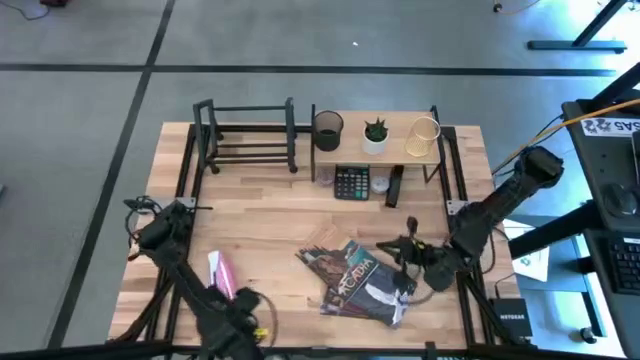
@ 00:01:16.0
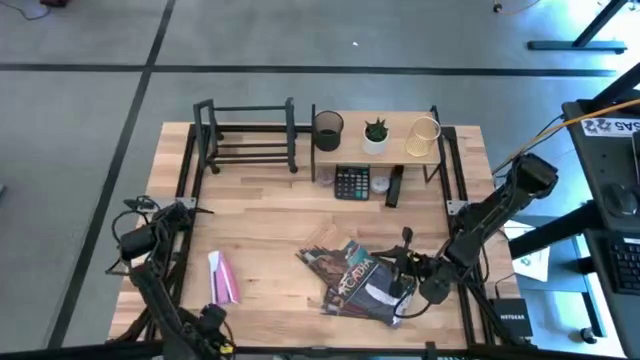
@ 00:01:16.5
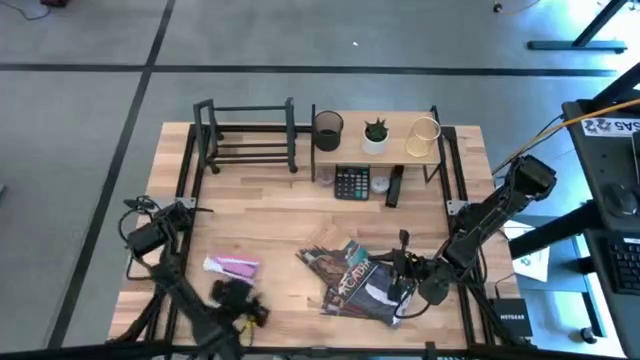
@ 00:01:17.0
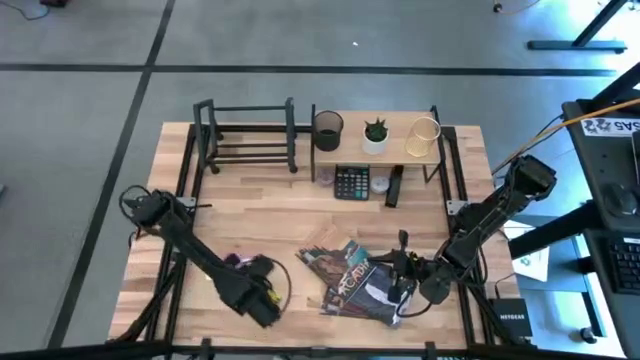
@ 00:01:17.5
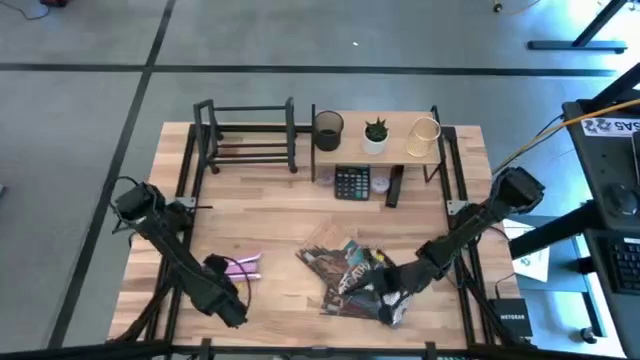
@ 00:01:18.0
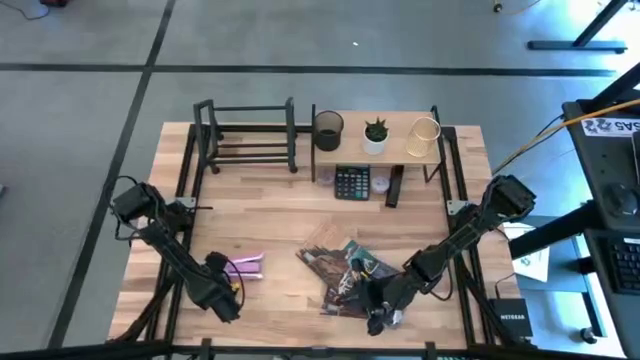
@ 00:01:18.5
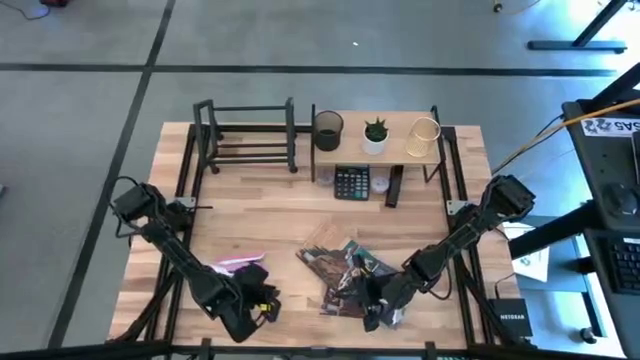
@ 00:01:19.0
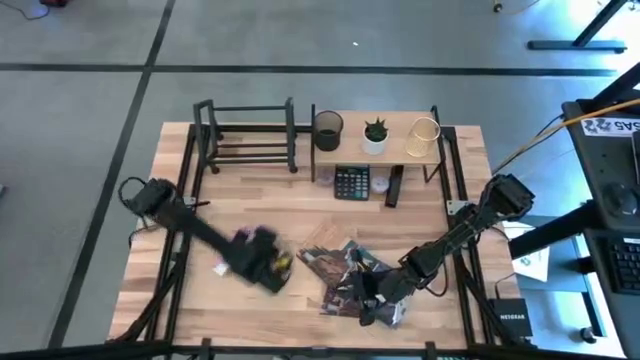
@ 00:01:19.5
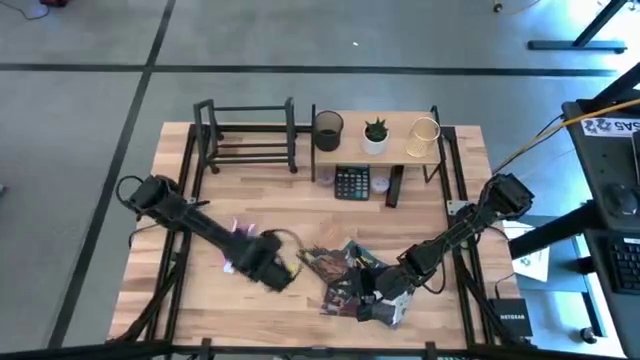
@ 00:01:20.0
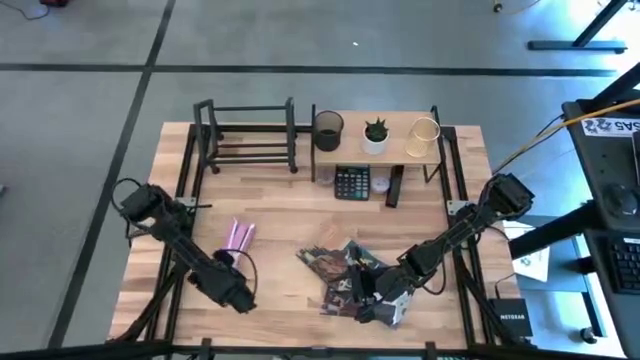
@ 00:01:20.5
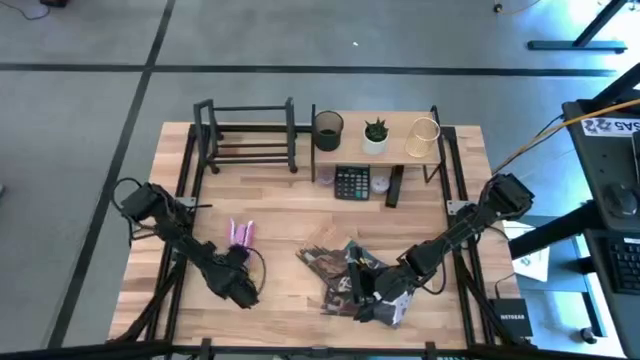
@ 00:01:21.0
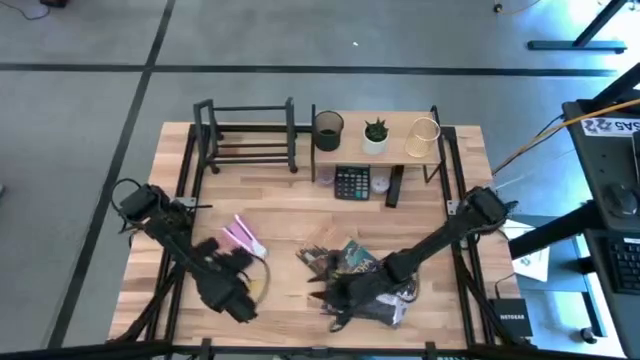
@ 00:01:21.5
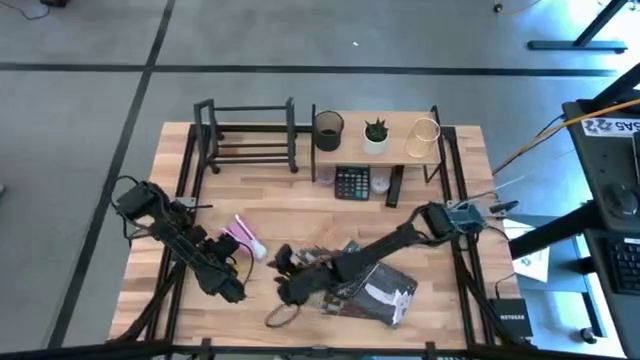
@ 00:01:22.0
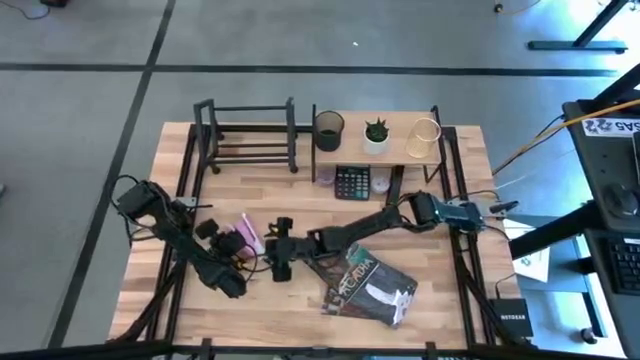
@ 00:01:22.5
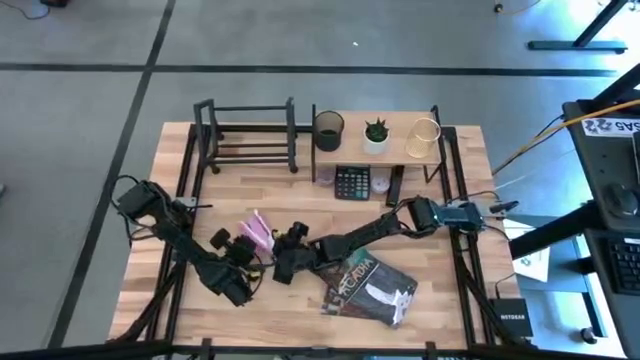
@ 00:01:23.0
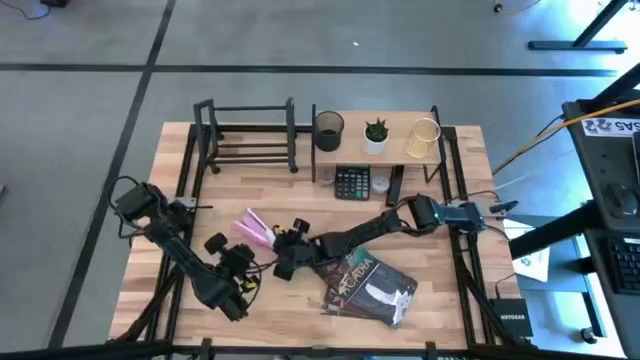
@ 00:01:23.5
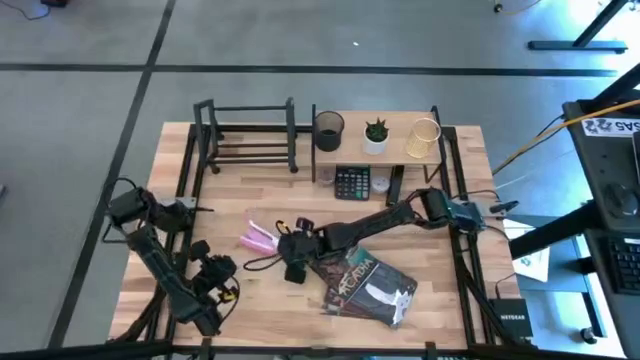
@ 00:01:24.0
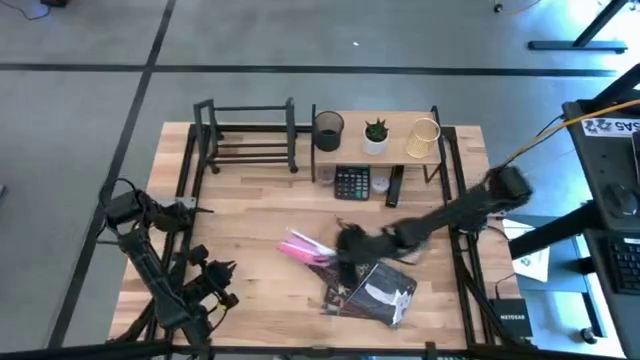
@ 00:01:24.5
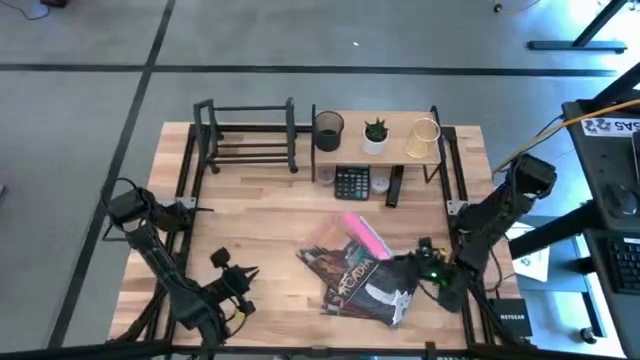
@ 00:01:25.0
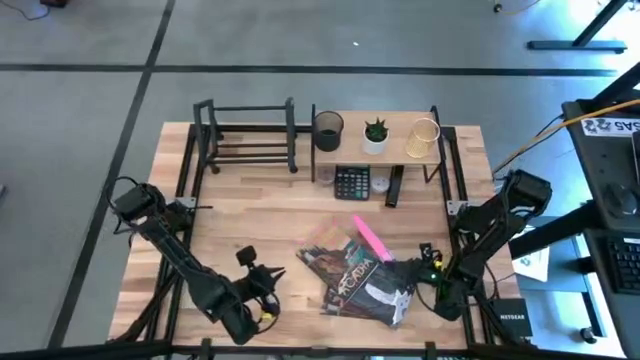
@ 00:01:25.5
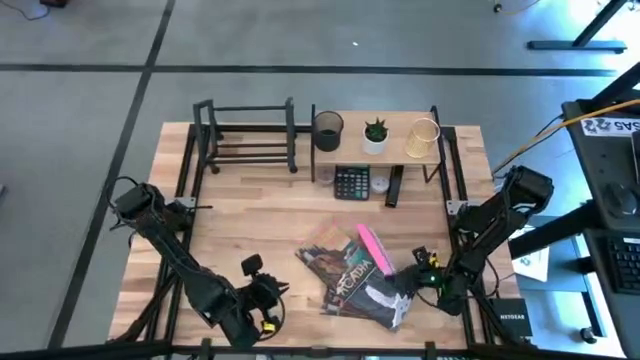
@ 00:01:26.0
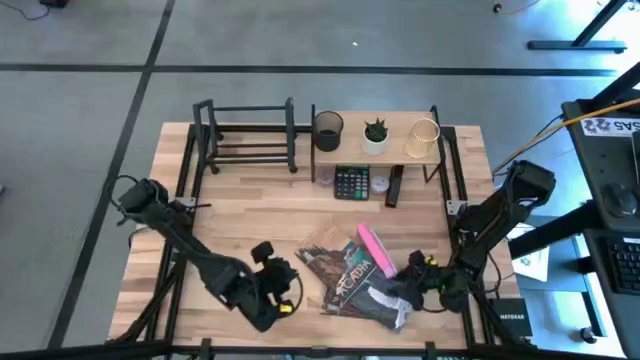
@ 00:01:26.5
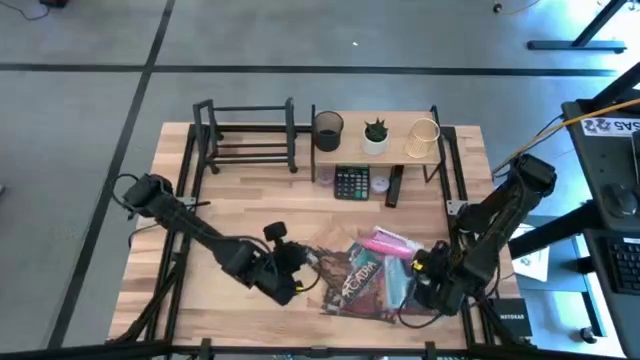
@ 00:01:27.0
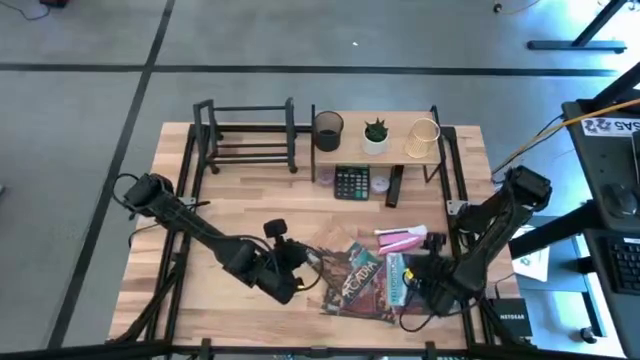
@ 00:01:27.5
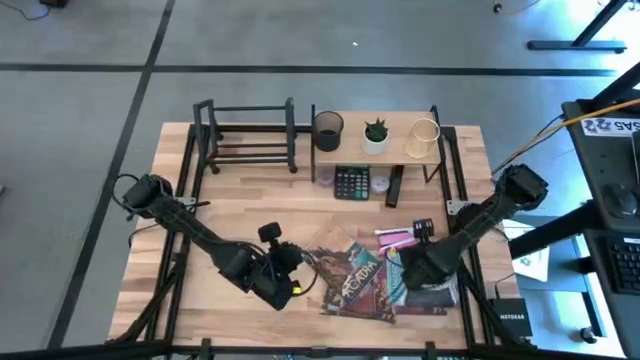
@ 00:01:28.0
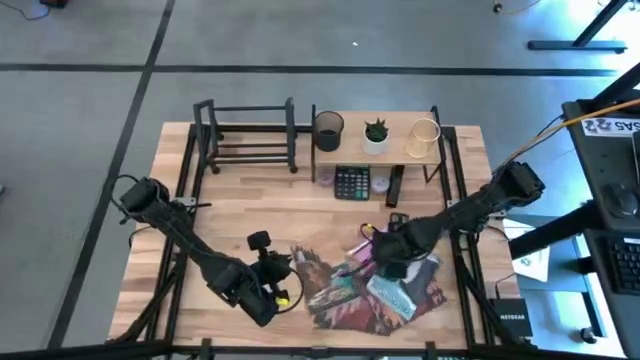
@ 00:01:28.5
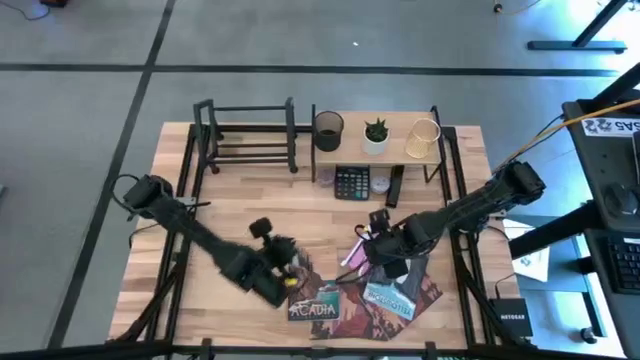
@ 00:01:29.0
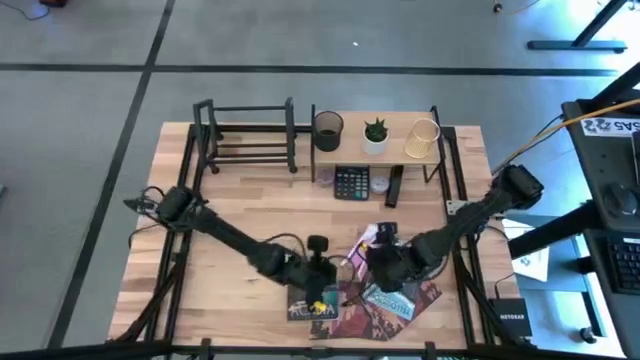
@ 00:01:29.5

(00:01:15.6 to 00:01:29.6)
Task: Stock shelves
Put the pink stapler under the shelf

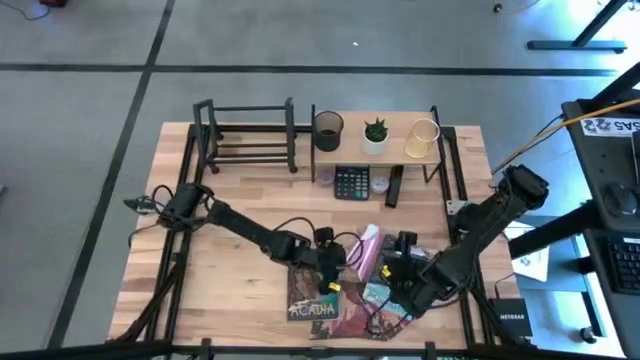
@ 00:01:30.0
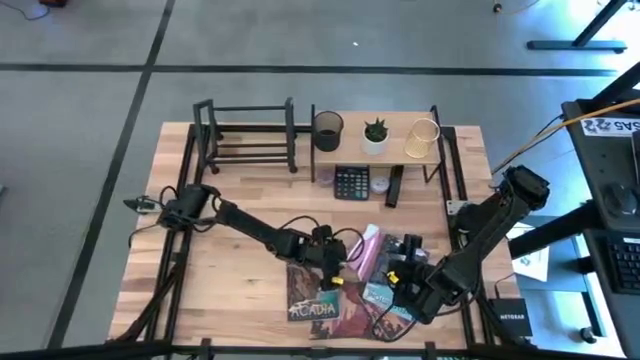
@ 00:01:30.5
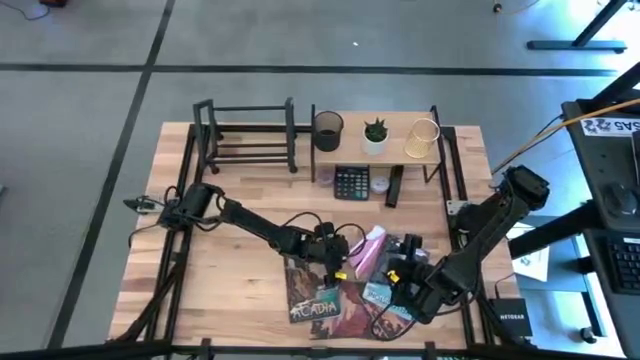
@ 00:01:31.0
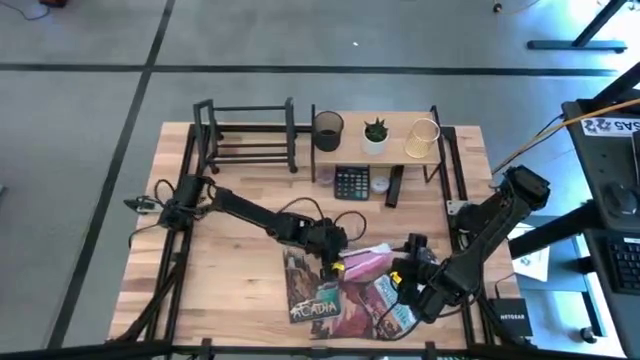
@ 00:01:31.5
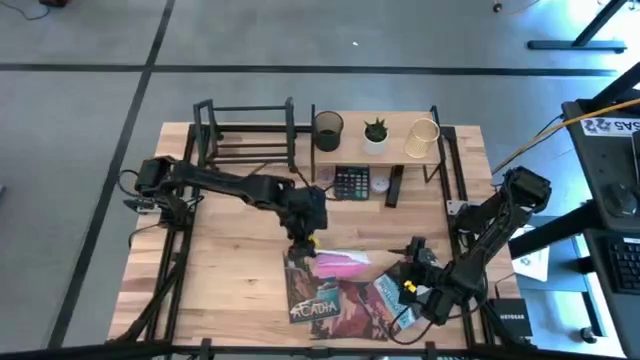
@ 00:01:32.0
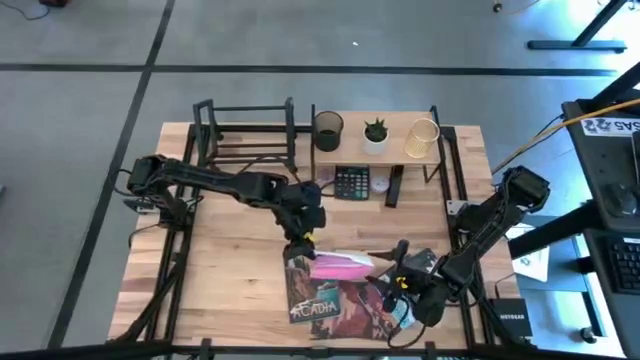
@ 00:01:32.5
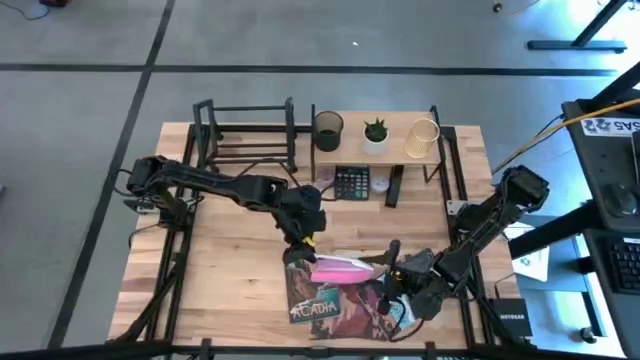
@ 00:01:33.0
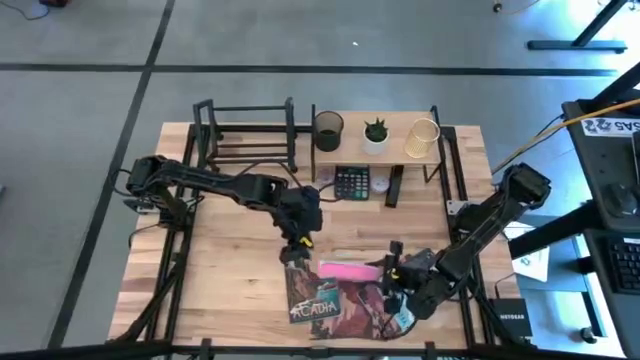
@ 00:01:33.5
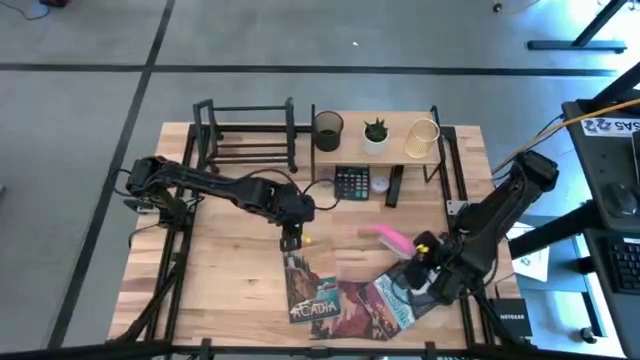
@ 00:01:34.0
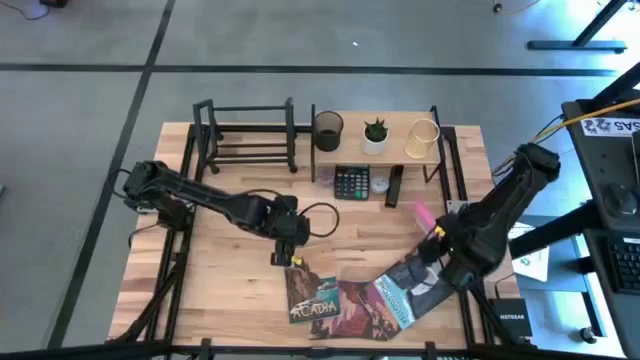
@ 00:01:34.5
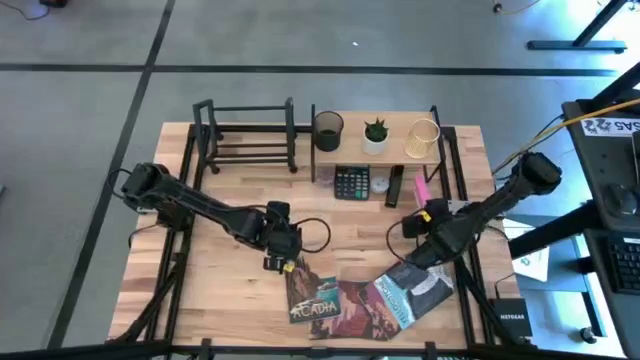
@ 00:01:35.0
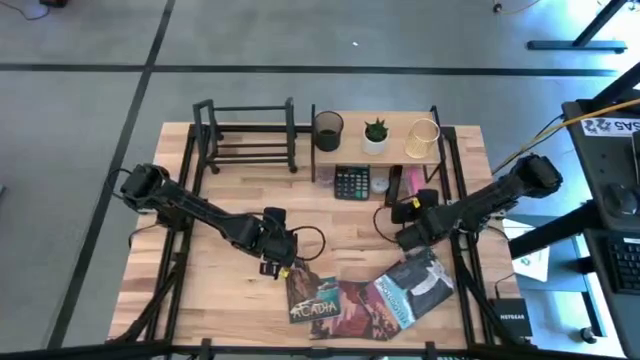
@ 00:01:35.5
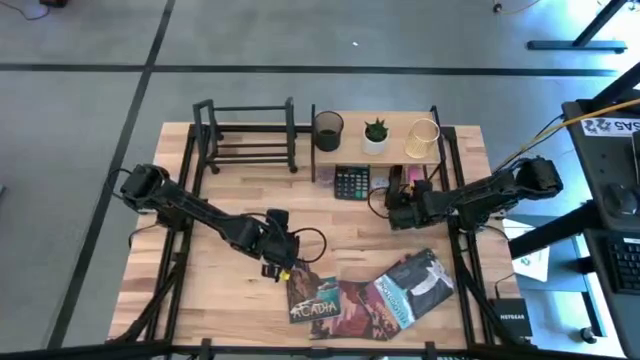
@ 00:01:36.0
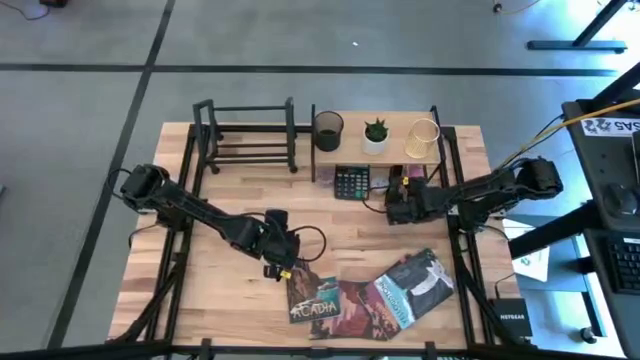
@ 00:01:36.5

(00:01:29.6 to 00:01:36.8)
Put the pink stapler under the shelf
